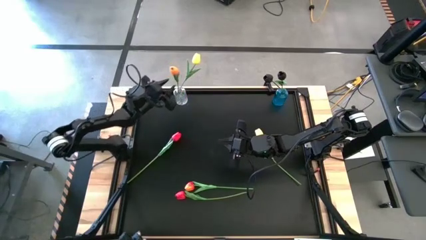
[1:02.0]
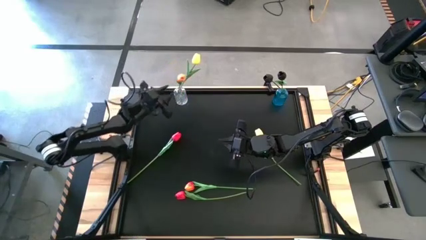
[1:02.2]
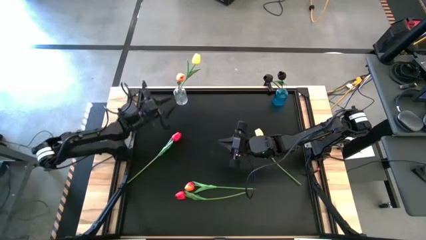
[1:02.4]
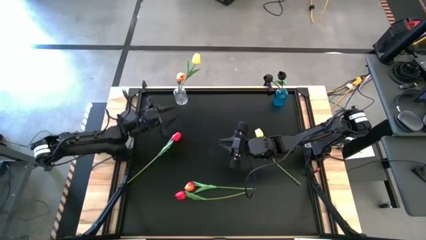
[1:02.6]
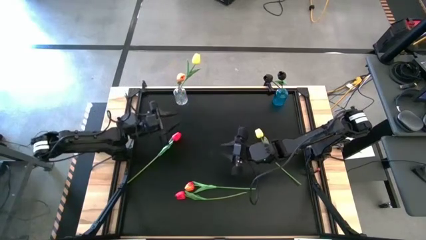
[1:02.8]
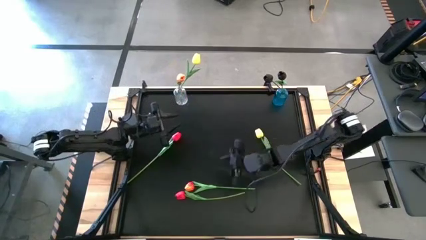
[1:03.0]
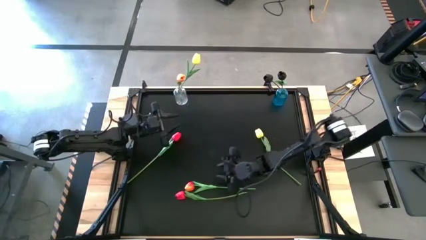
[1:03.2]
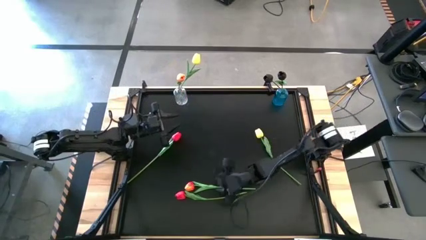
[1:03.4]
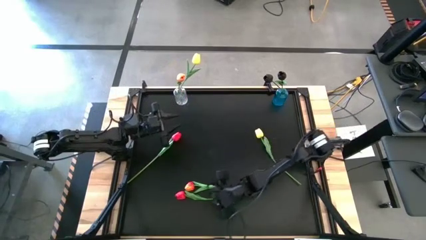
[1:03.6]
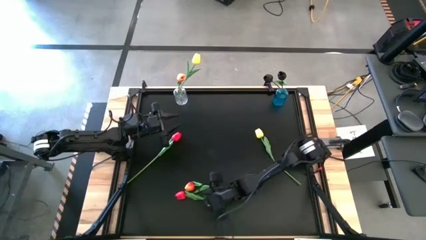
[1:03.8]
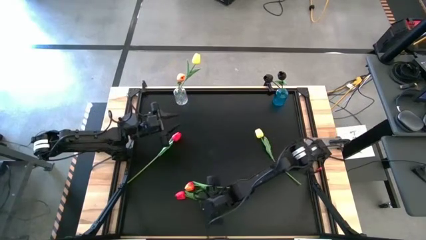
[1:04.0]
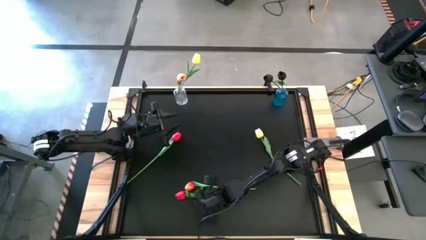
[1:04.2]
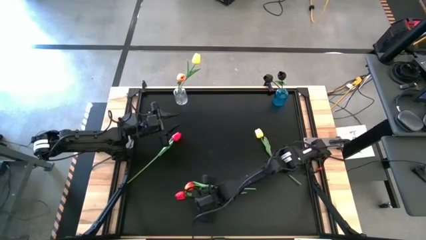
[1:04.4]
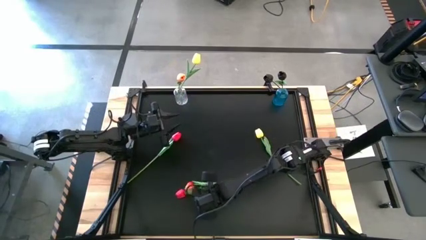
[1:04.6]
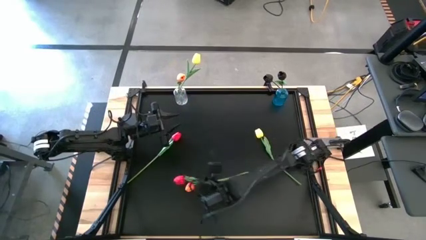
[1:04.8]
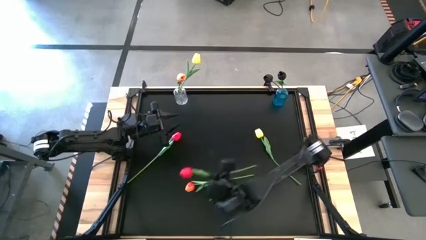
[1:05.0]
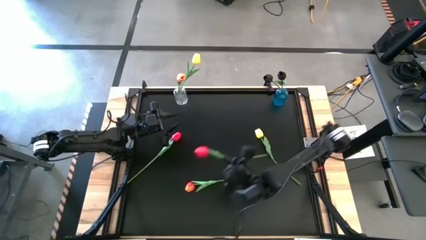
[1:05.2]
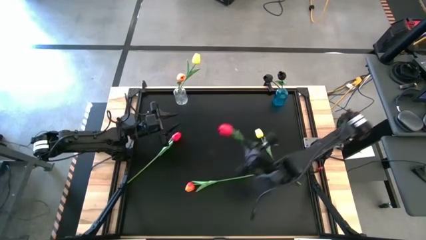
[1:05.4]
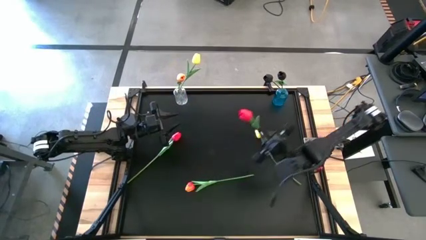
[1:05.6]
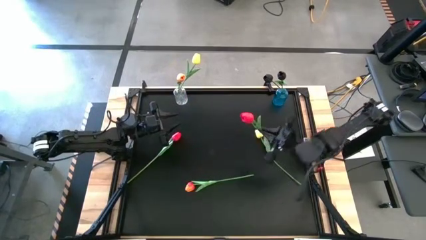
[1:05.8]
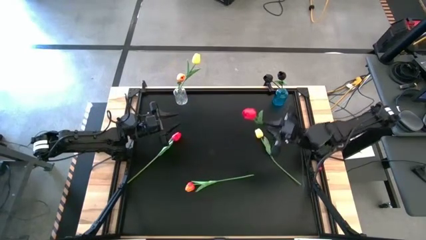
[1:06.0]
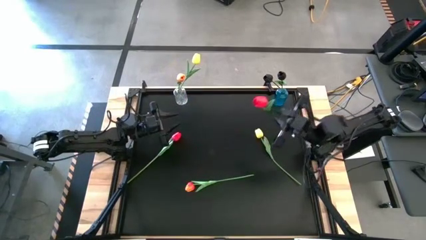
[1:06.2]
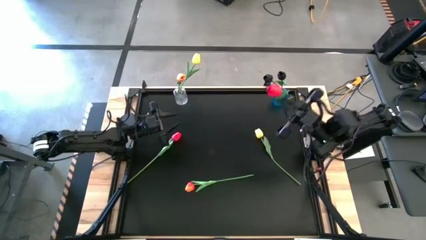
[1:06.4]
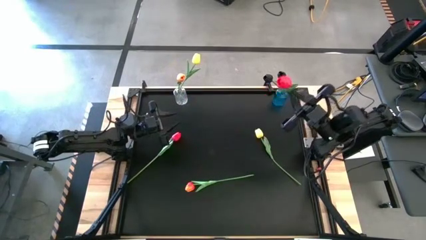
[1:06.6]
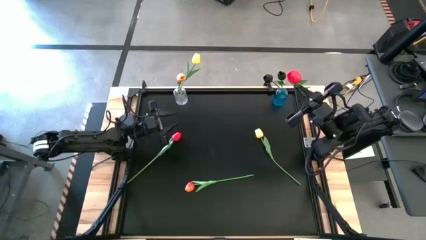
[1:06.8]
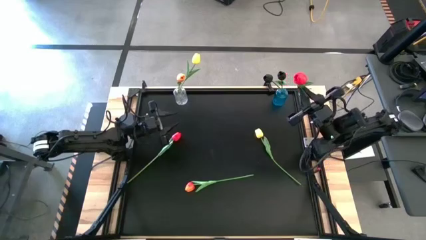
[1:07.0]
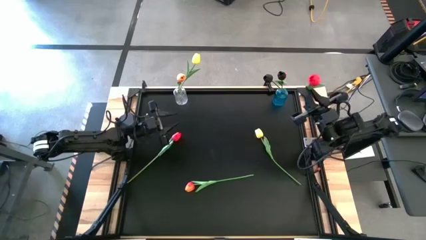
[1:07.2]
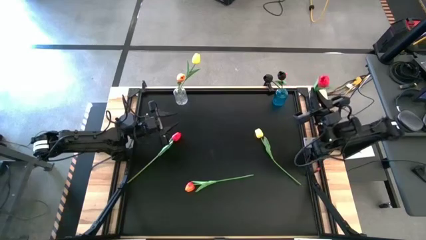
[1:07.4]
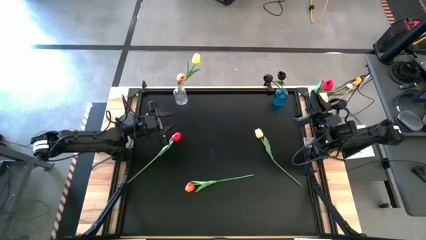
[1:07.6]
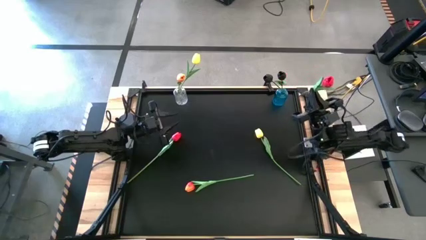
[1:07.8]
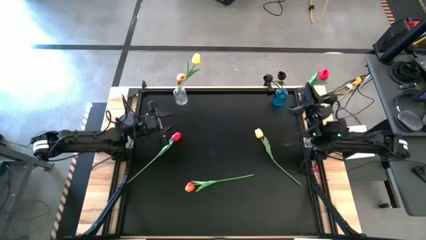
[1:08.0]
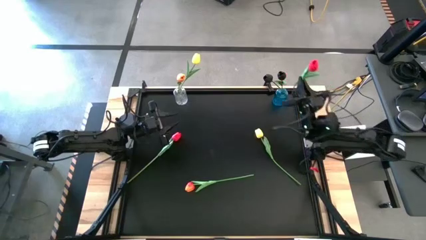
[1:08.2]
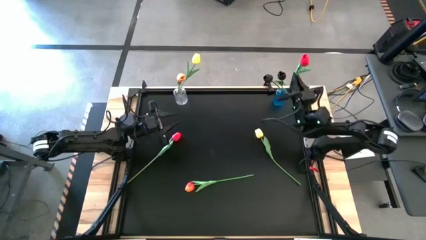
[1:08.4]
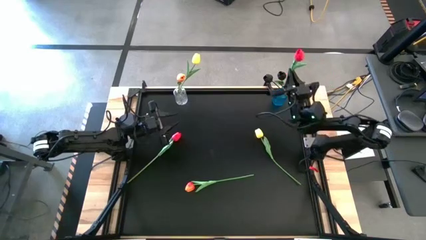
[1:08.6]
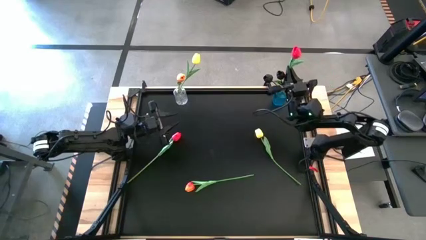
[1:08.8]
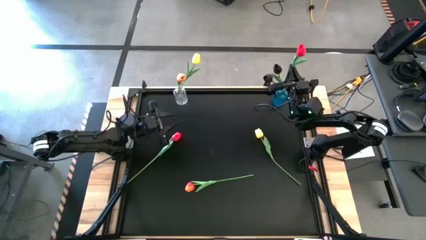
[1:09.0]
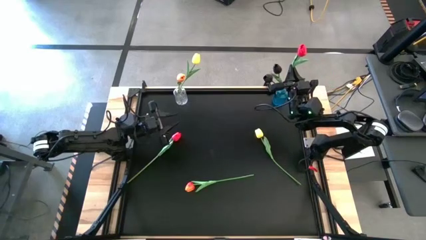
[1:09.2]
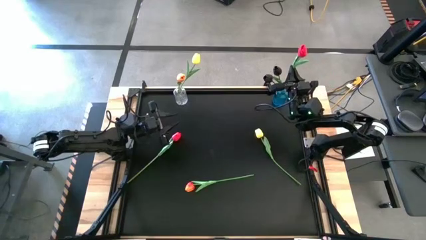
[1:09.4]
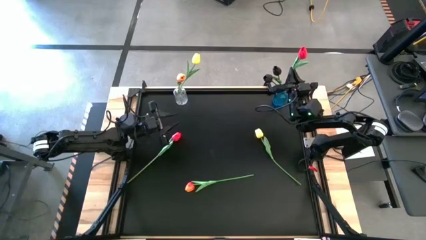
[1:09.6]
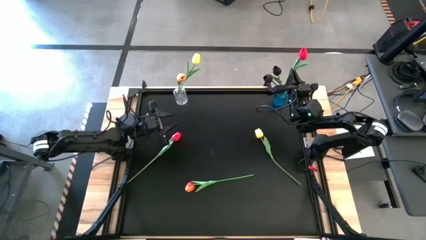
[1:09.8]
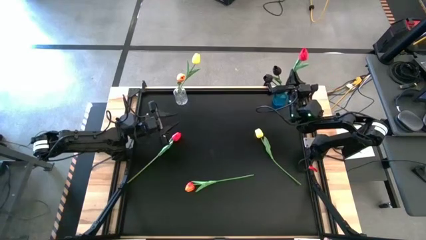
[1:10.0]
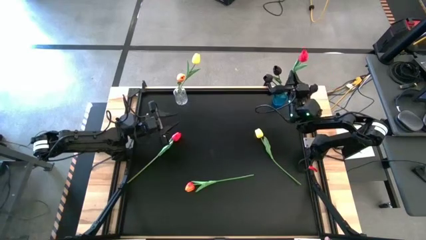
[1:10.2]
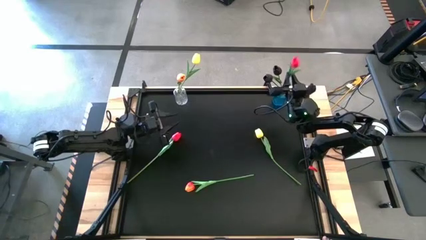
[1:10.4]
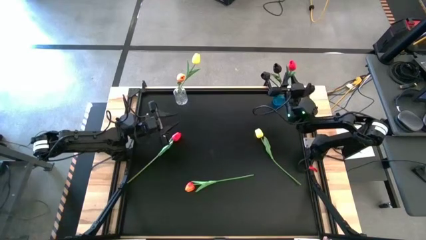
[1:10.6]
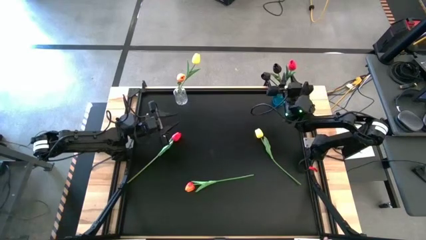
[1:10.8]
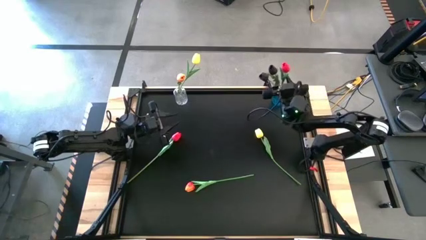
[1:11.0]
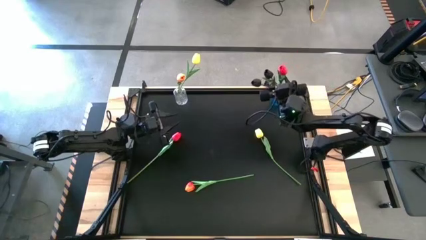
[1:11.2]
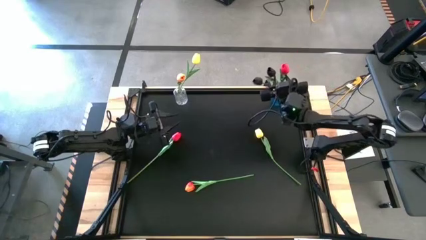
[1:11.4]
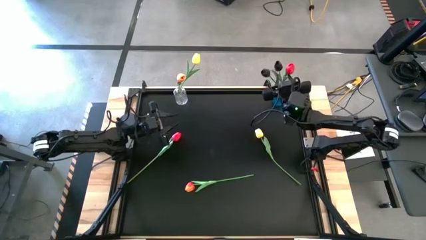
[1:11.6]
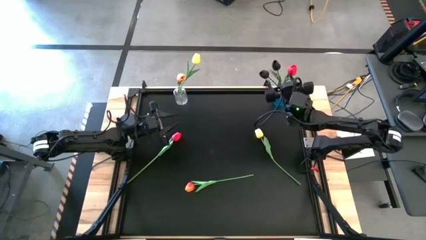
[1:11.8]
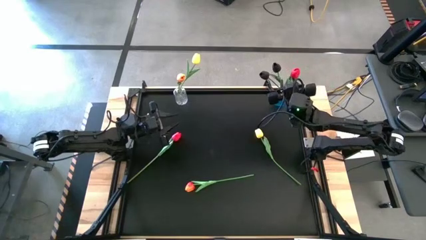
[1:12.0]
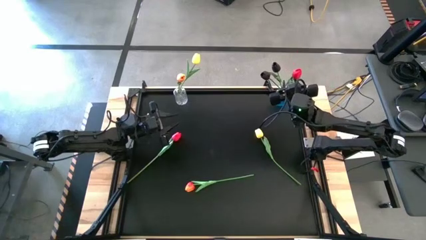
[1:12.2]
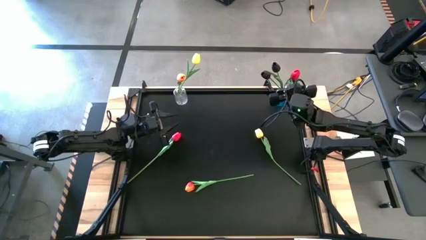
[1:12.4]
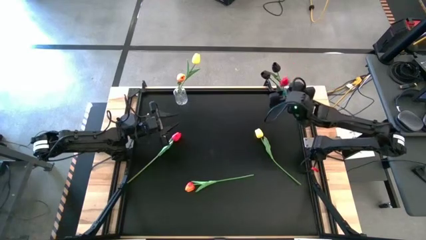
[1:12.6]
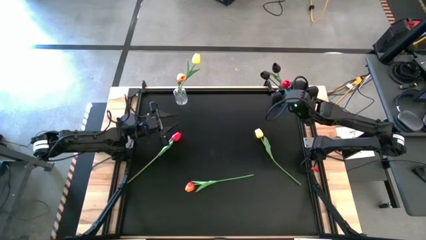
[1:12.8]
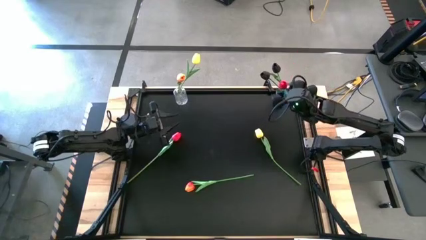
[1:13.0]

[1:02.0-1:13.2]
Task: Sort flowers into vase by color
Put the bottom red flower into the blue vase

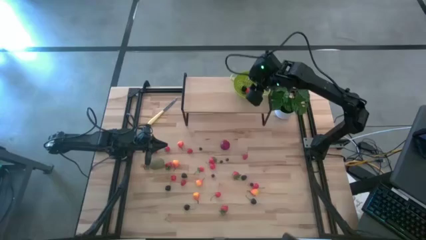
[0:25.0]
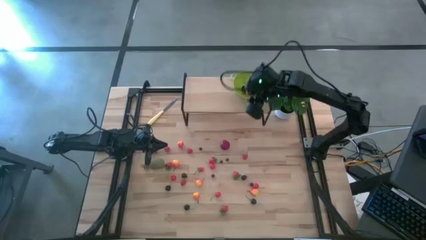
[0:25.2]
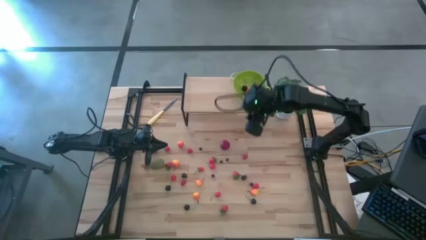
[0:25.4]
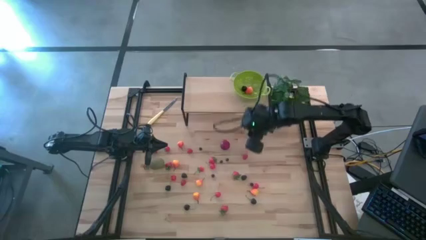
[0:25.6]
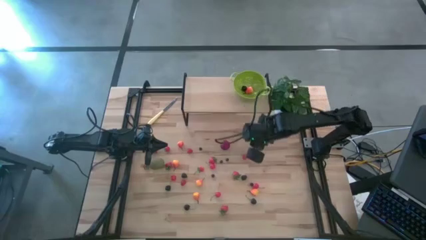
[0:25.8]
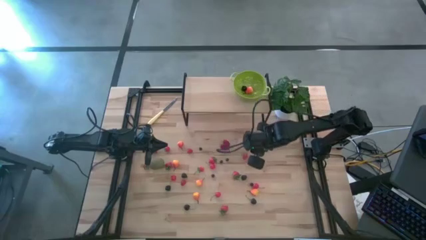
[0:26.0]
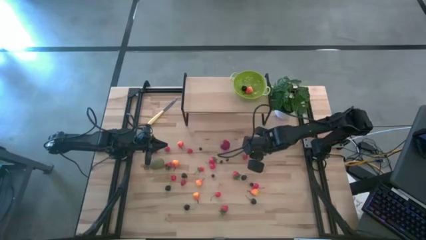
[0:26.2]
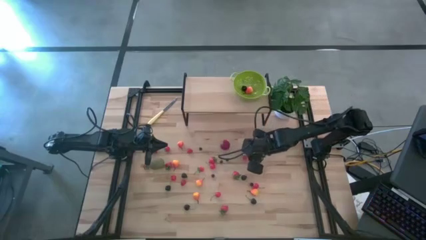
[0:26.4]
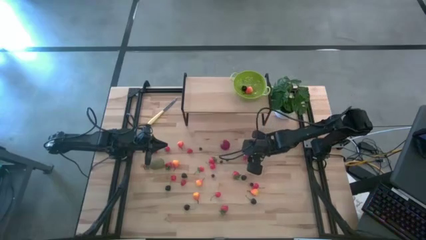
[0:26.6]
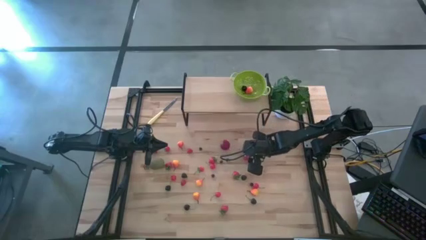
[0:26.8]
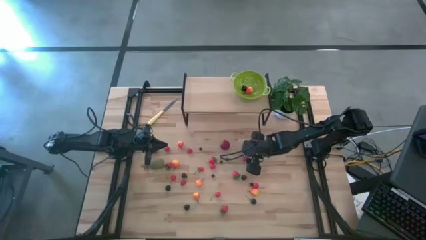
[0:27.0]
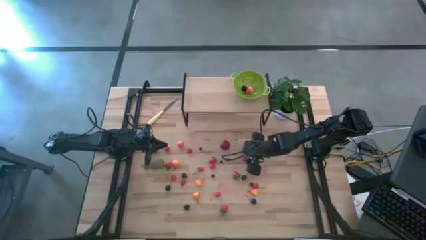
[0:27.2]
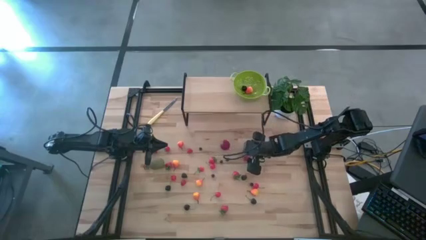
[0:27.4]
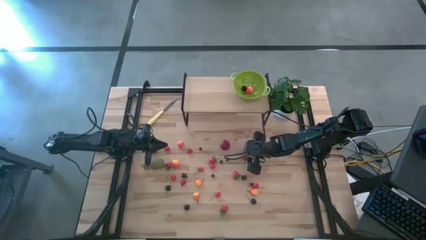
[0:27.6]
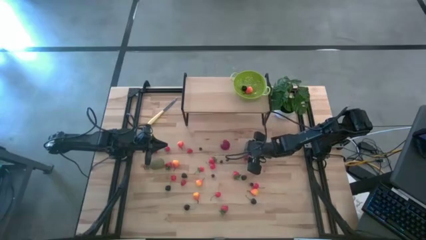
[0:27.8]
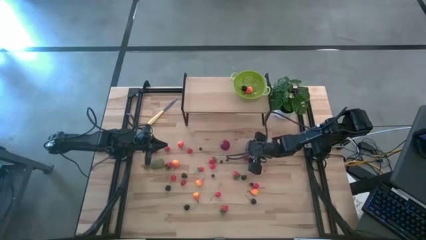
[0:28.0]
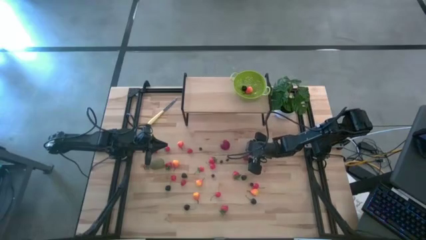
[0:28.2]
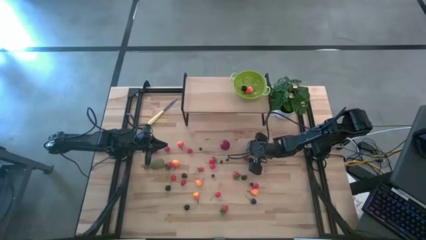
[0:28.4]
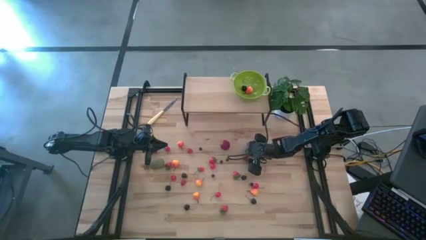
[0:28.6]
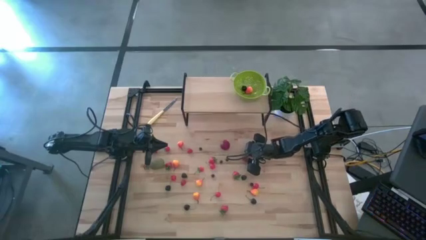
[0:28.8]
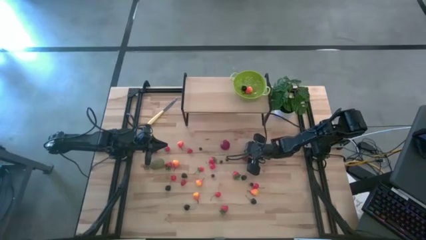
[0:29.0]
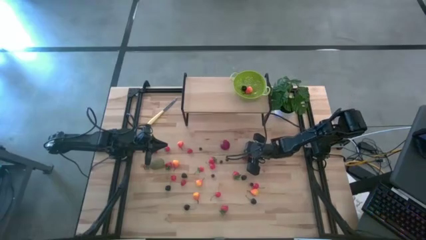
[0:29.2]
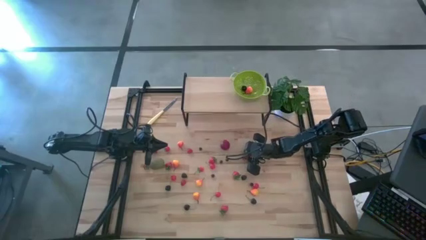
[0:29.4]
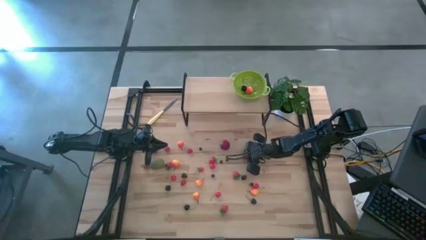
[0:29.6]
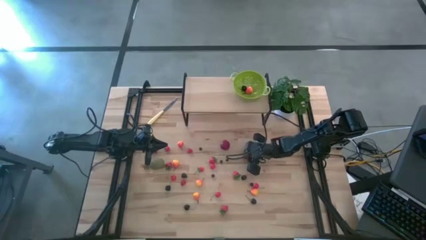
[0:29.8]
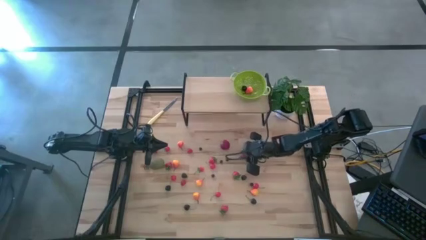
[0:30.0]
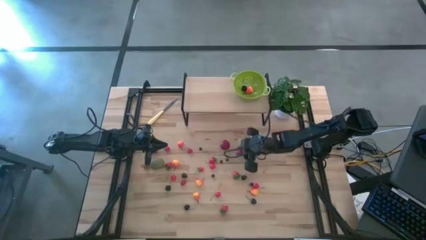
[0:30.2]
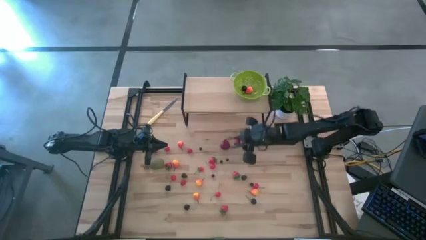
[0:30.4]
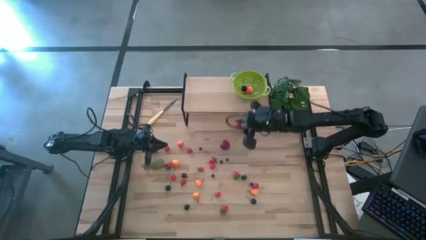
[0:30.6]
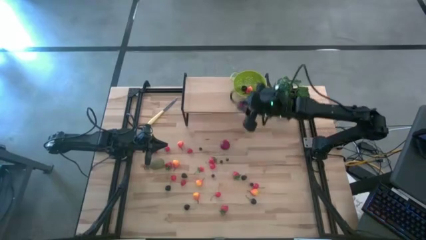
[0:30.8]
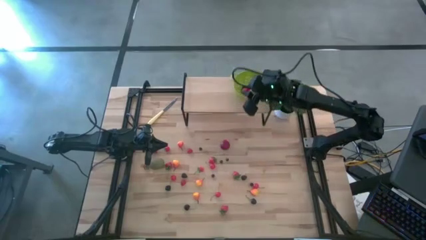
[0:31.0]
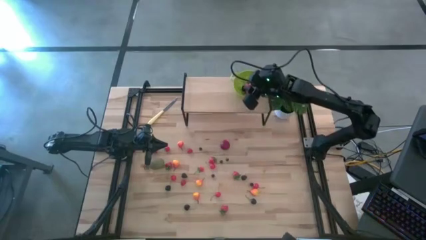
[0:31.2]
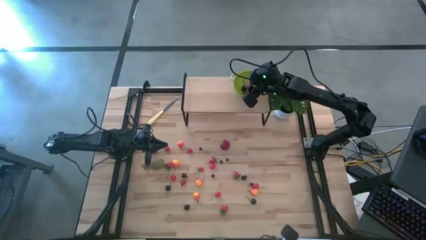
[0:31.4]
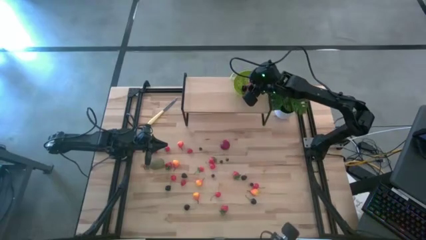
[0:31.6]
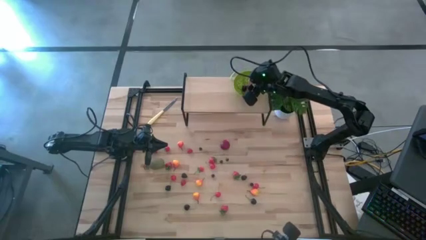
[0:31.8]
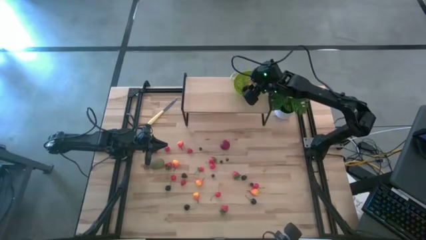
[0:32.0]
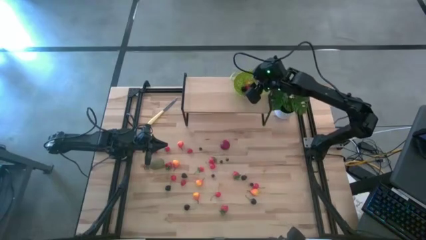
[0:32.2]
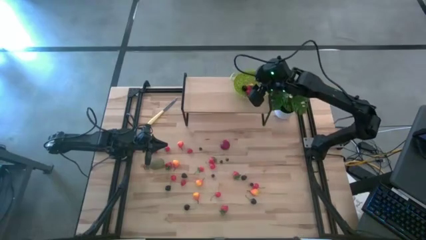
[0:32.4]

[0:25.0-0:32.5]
Task: Build produce basket
Put the raspberry into the green basket
